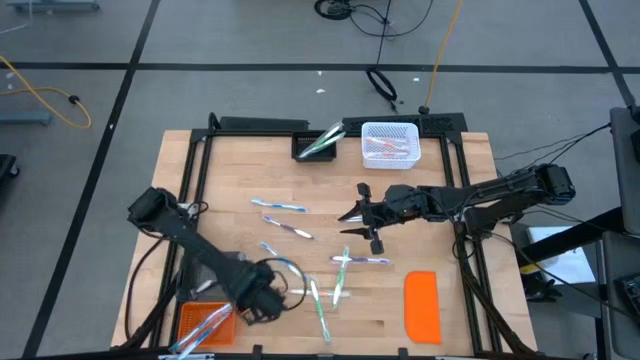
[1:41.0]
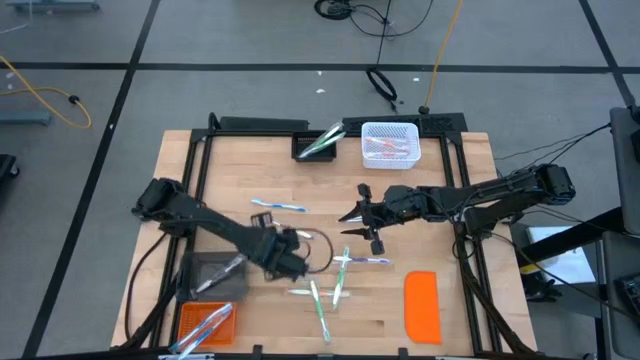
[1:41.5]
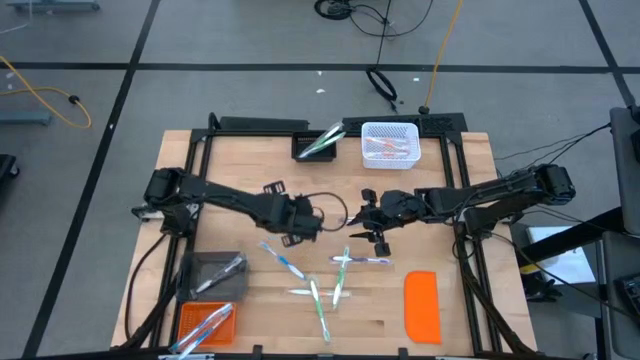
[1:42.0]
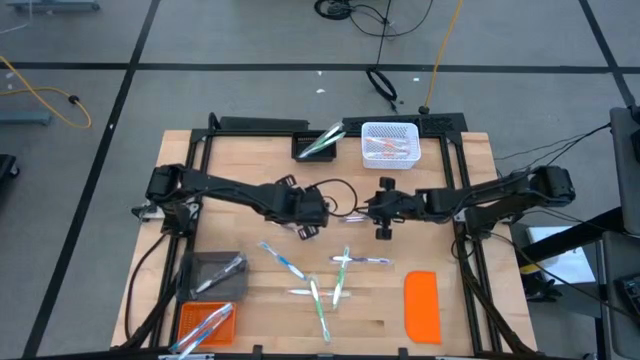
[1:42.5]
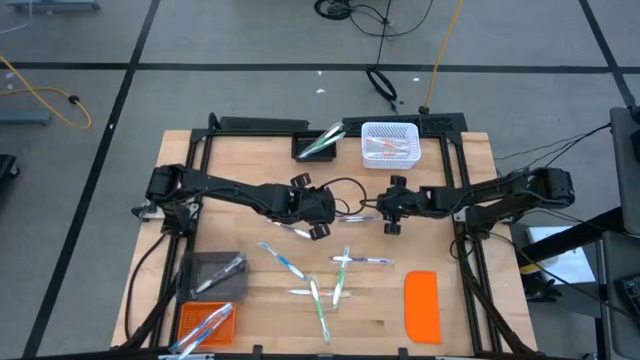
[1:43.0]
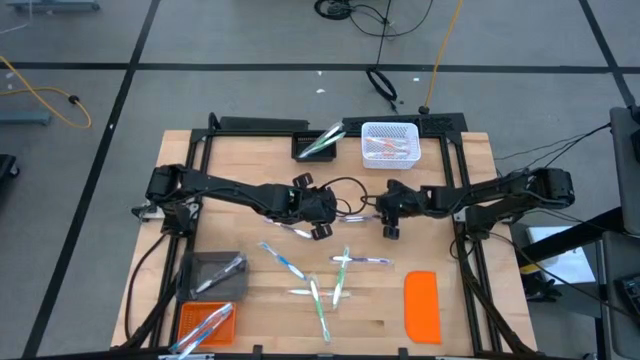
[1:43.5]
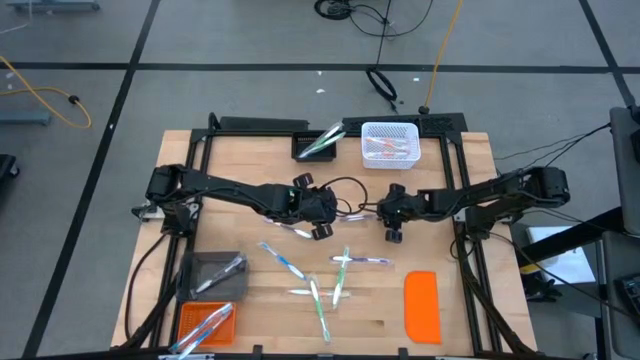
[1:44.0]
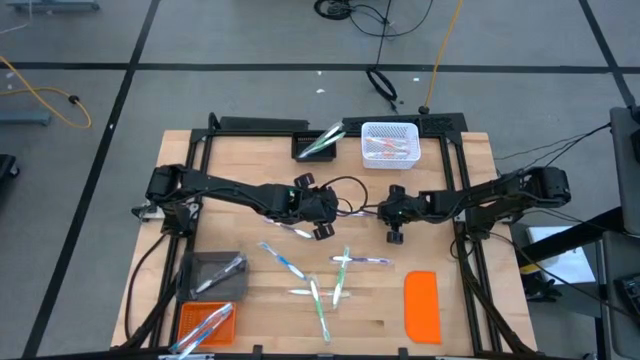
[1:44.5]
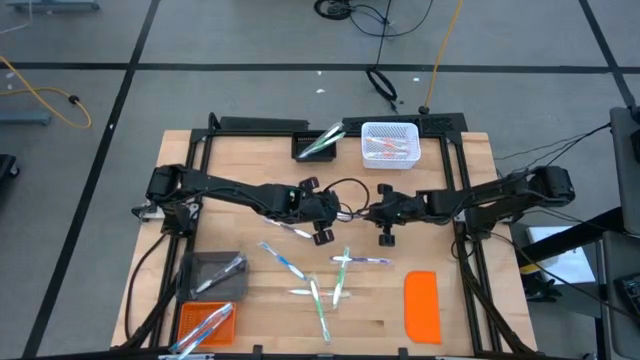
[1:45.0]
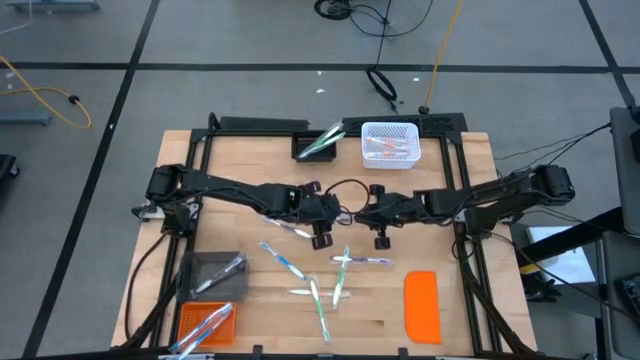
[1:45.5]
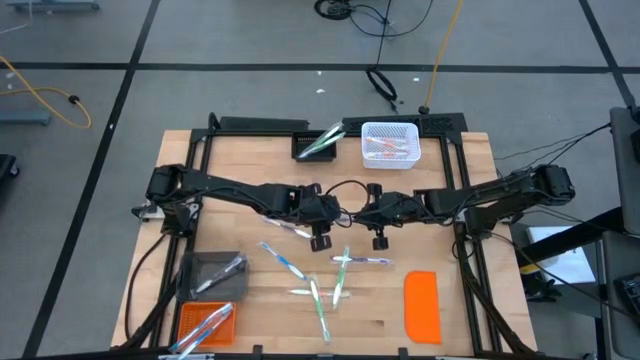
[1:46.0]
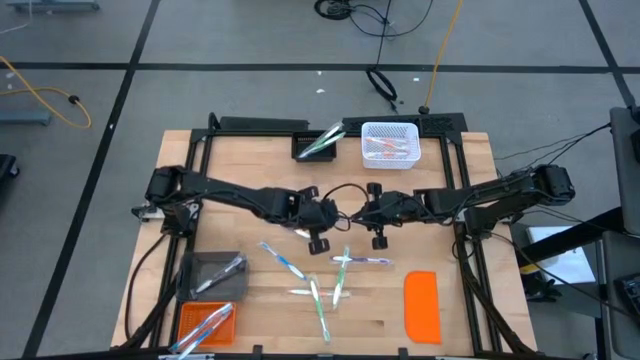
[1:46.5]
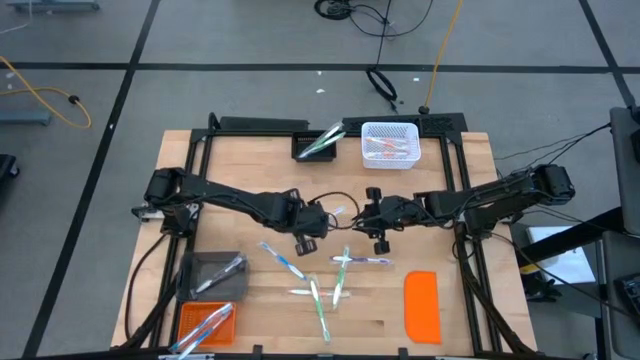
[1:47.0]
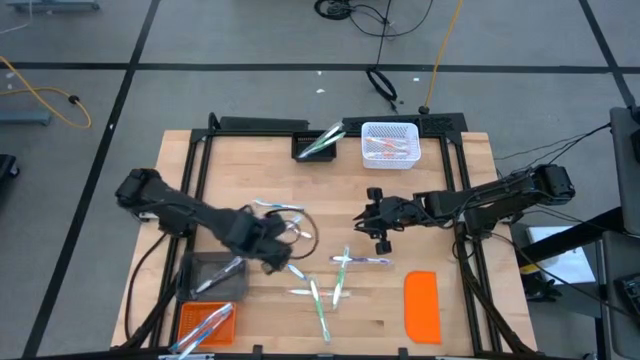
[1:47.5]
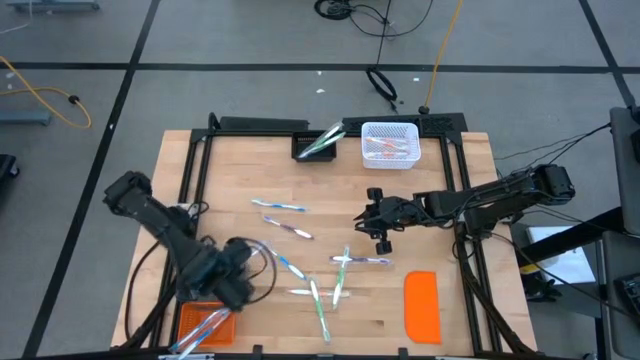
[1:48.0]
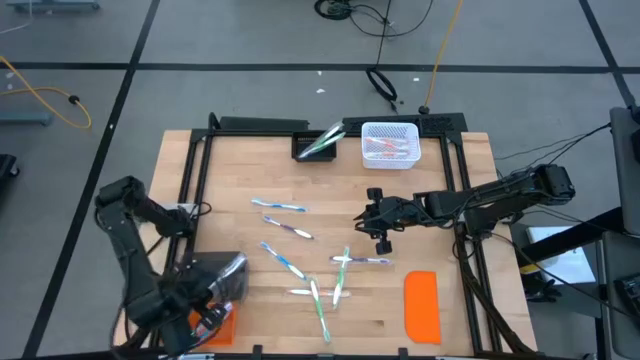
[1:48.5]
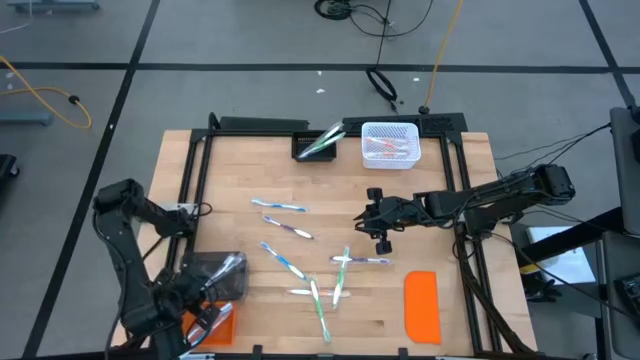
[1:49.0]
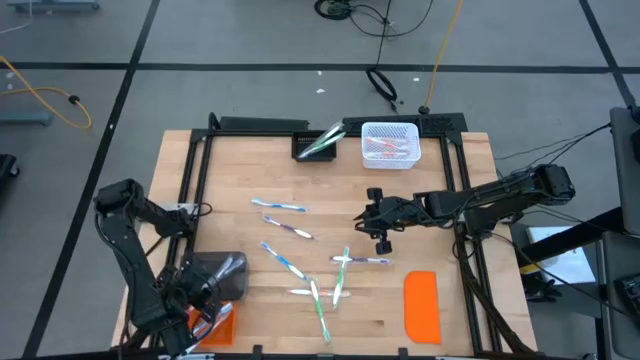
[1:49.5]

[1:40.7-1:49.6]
Task: Pick & Place Toothbrushes
Put the violet toothbrush into the transparent bin

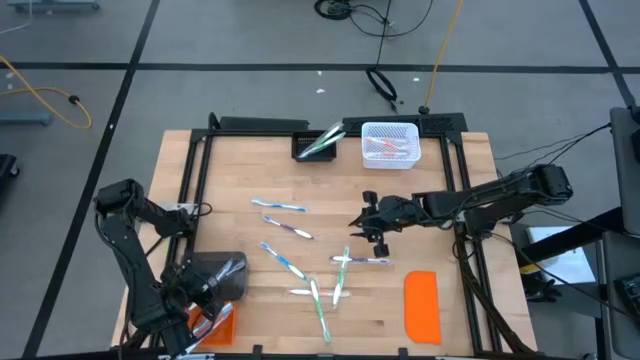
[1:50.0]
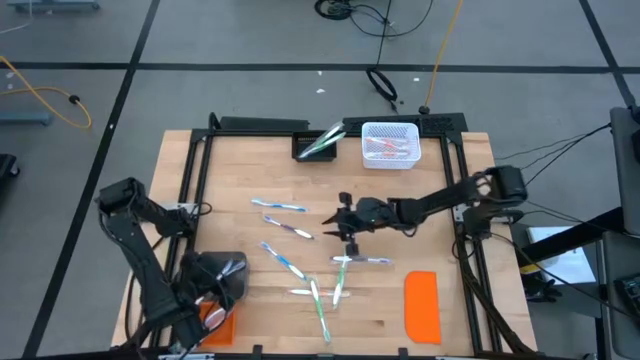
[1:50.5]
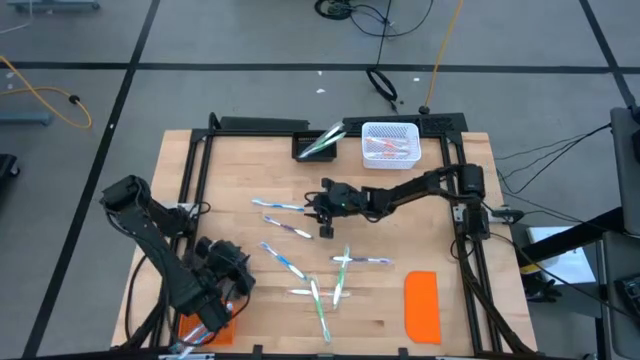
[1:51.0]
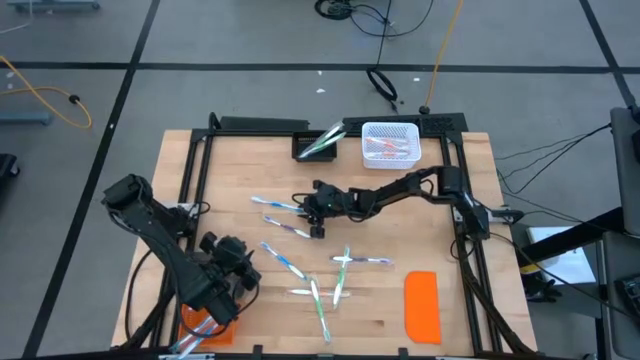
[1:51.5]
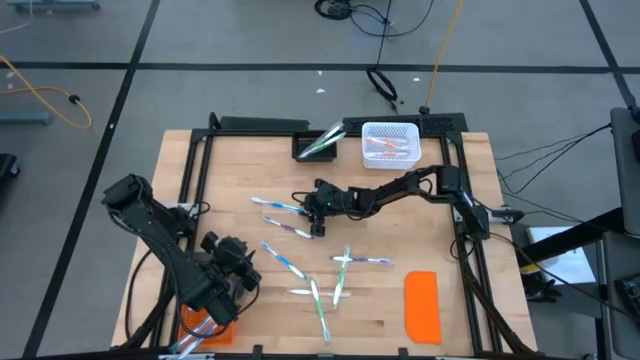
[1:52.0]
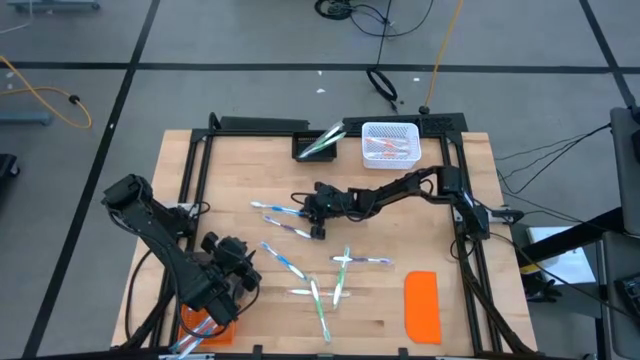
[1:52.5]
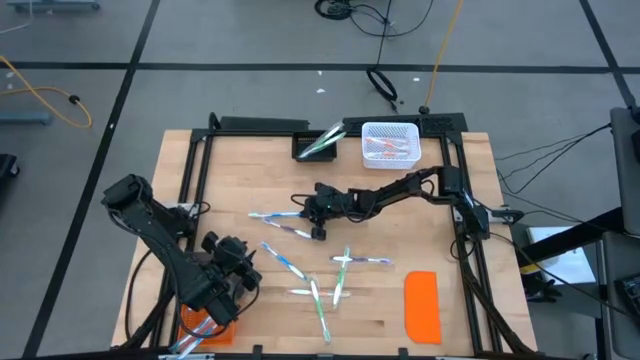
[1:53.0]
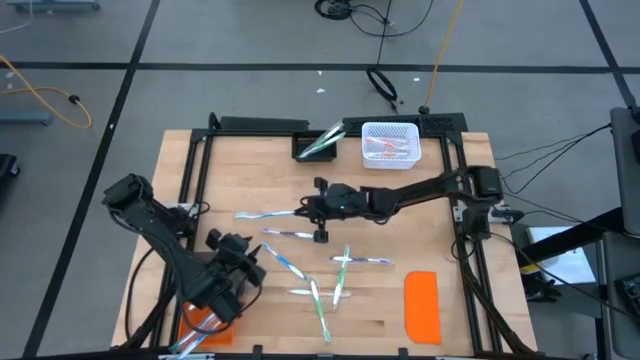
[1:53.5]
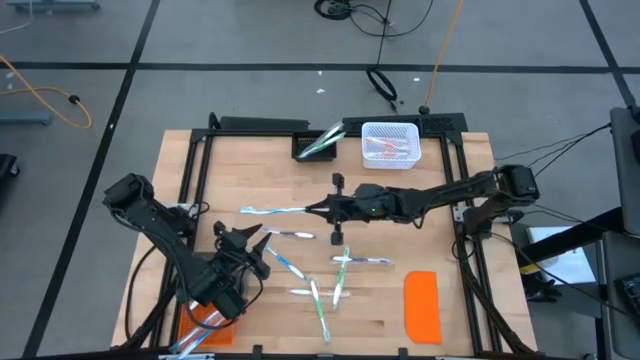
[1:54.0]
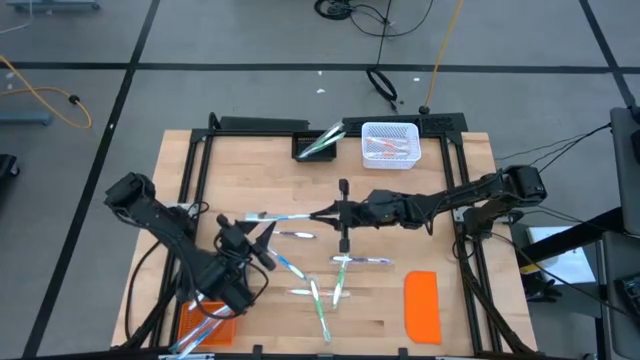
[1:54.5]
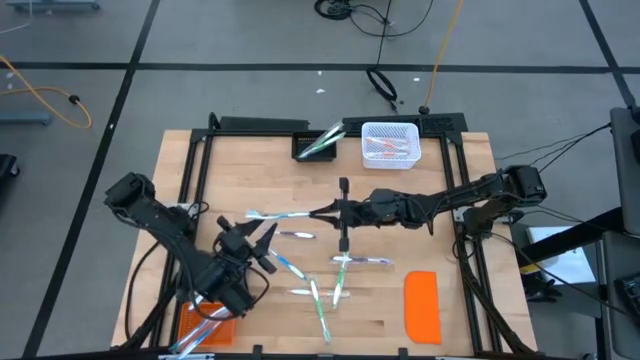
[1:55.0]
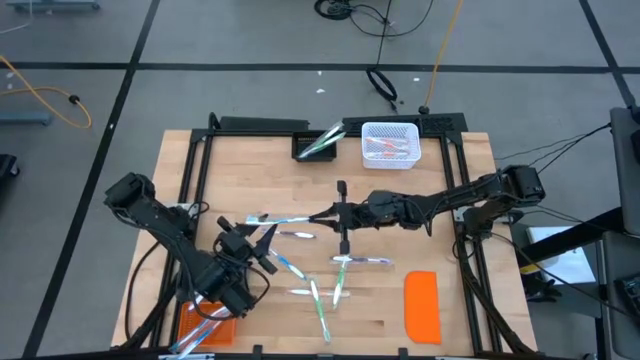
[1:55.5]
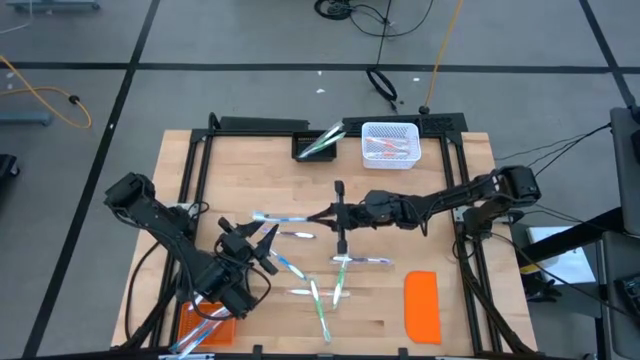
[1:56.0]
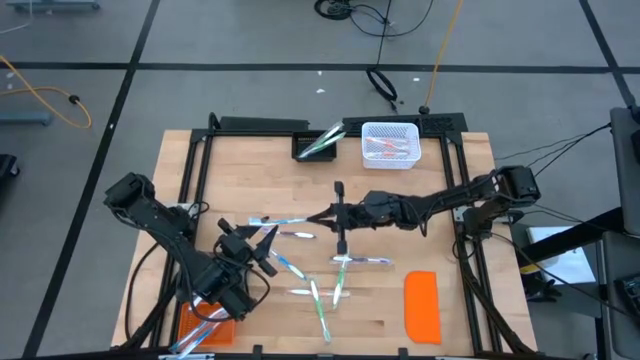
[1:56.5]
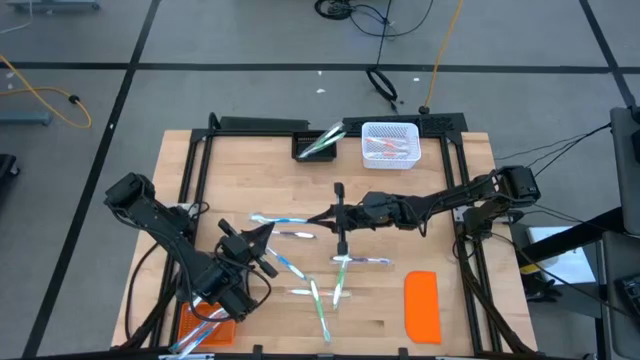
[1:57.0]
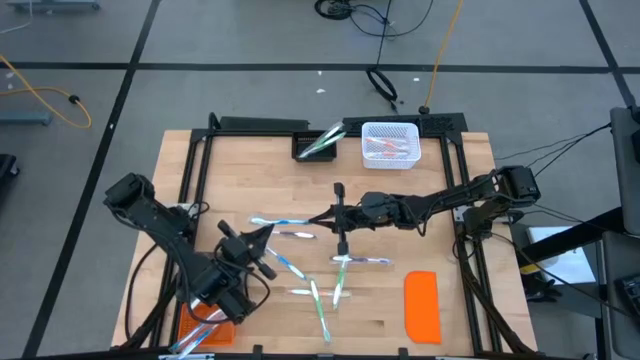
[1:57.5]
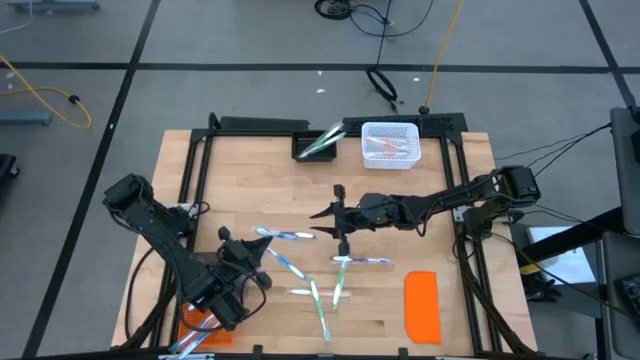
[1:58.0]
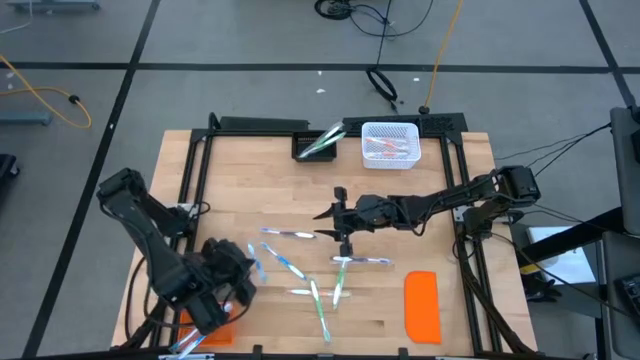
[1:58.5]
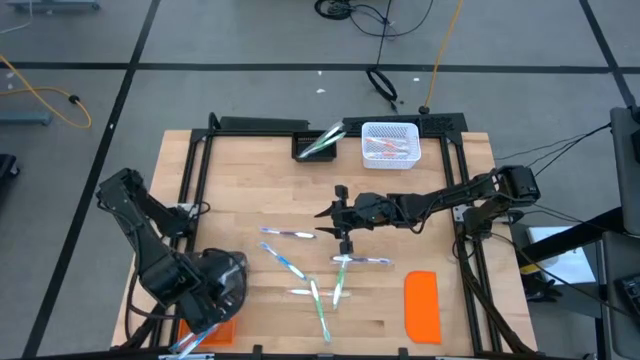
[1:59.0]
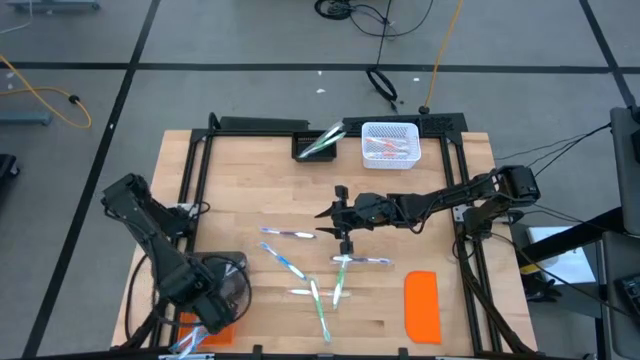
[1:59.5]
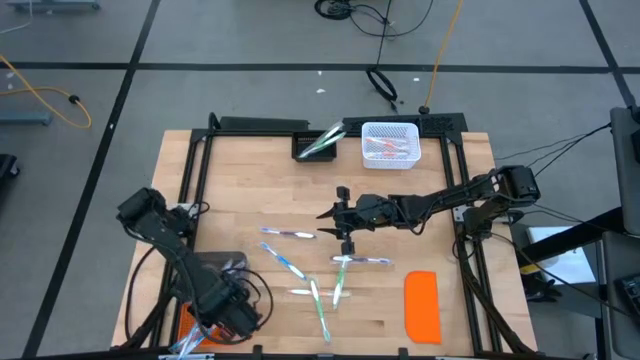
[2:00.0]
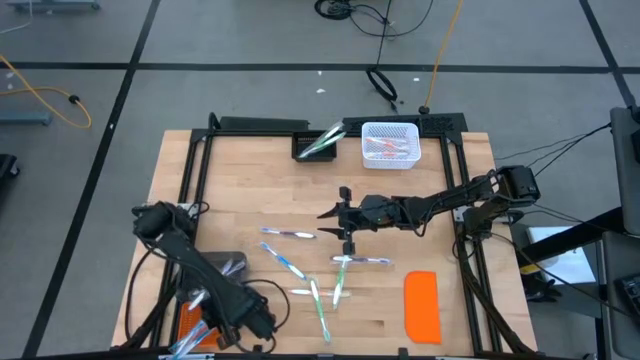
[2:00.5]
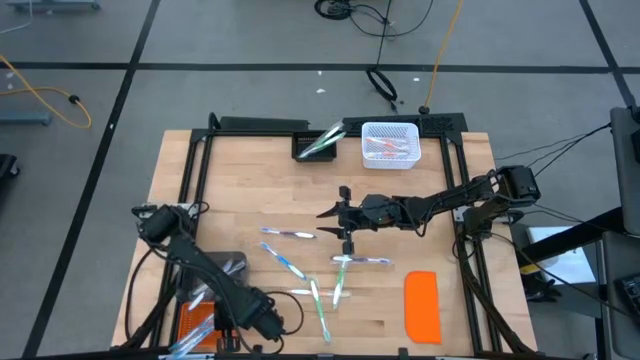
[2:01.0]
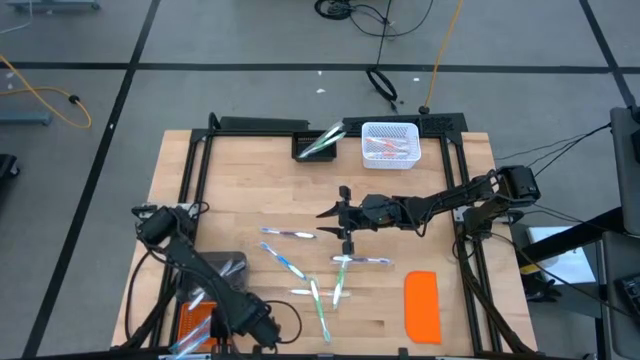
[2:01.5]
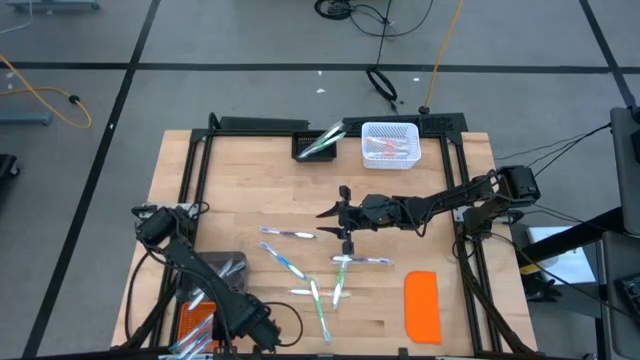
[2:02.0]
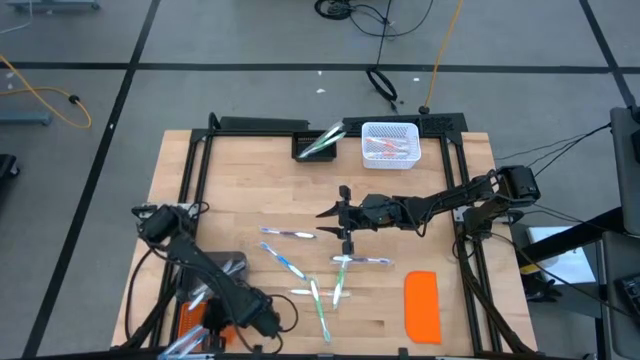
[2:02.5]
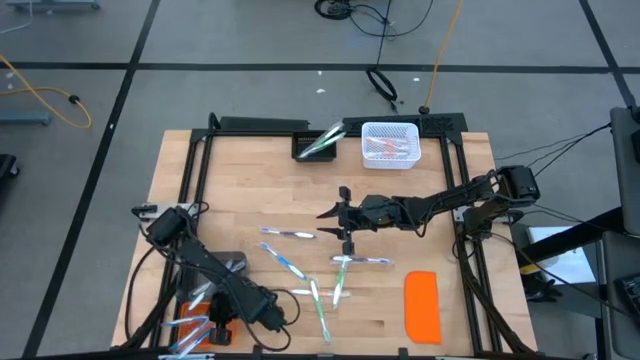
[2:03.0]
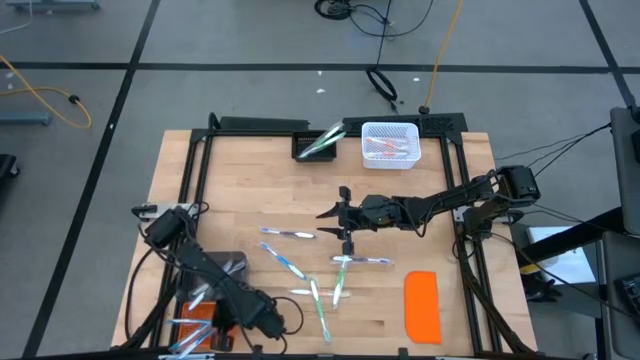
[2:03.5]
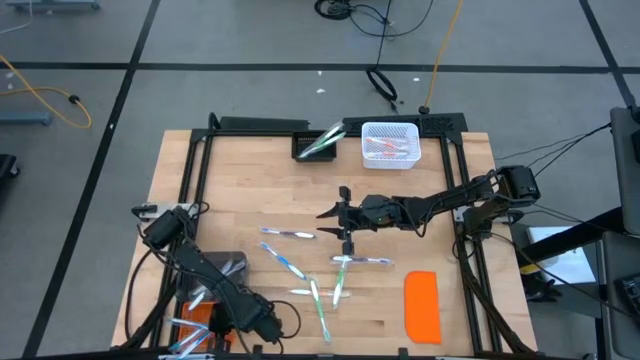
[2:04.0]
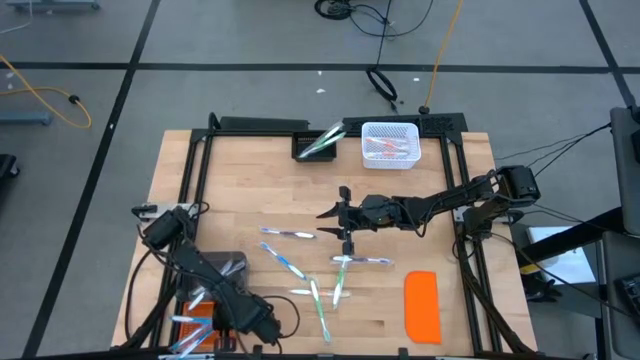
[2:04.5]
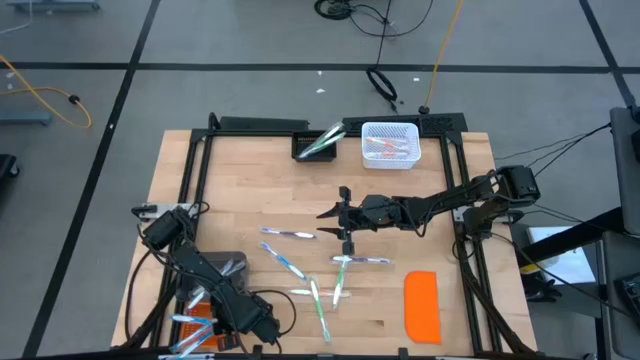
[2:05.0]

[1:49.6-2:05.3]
Put the blue toothbrush into the orange bin
